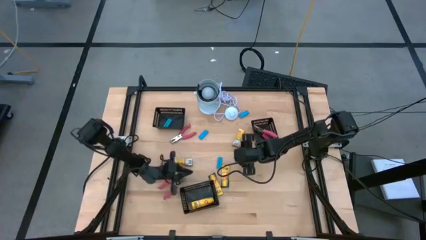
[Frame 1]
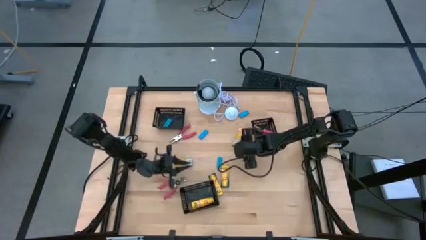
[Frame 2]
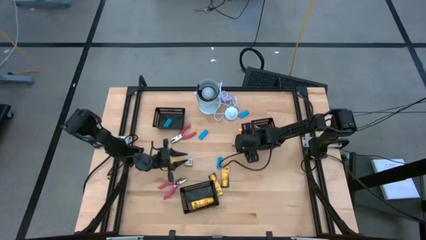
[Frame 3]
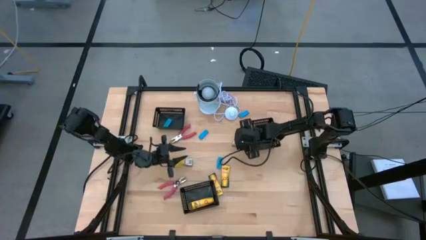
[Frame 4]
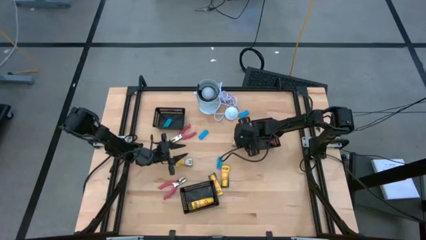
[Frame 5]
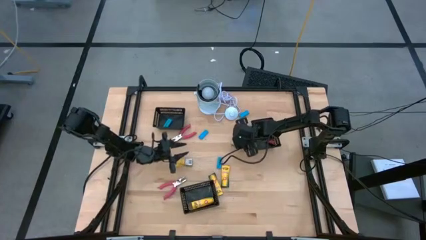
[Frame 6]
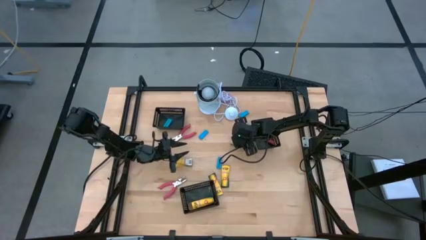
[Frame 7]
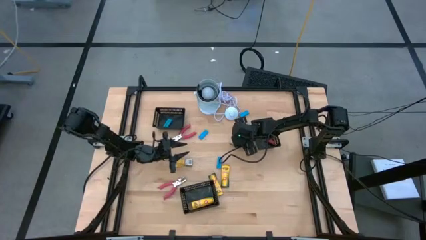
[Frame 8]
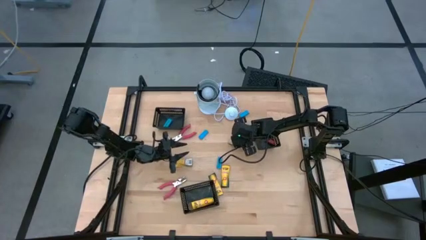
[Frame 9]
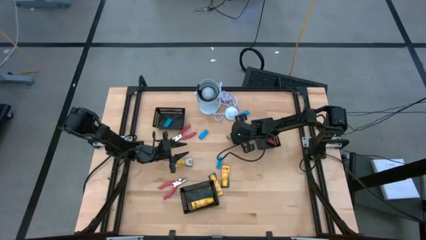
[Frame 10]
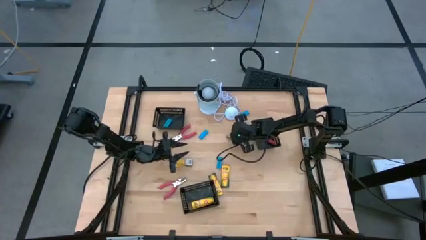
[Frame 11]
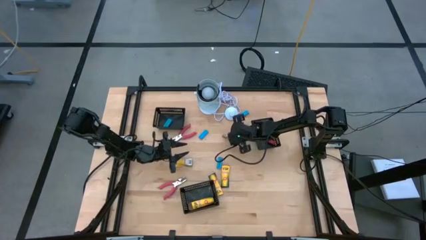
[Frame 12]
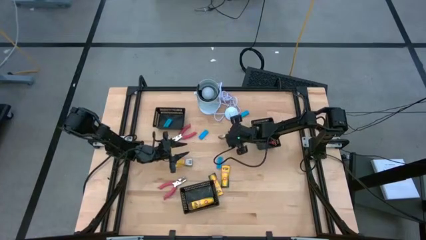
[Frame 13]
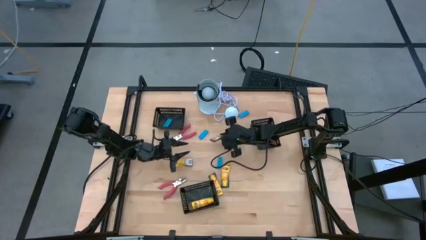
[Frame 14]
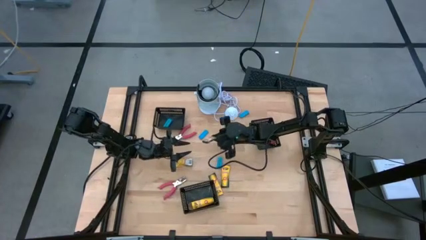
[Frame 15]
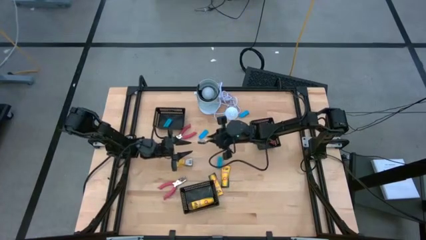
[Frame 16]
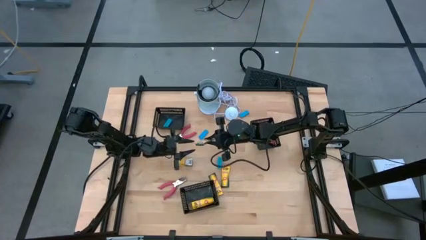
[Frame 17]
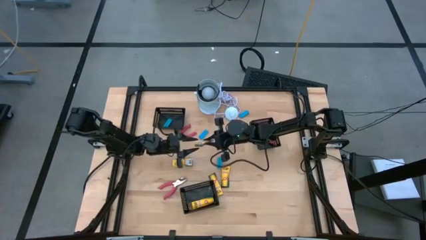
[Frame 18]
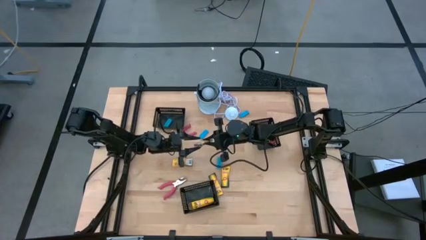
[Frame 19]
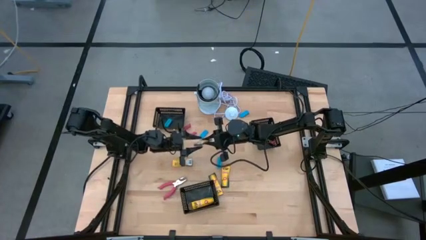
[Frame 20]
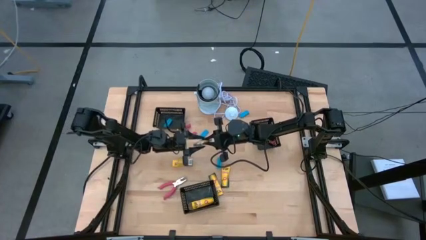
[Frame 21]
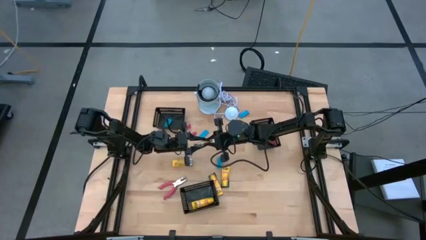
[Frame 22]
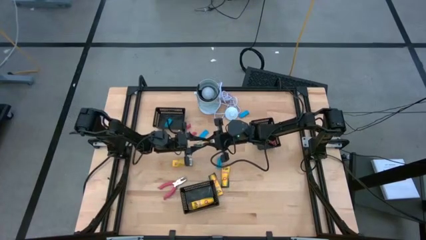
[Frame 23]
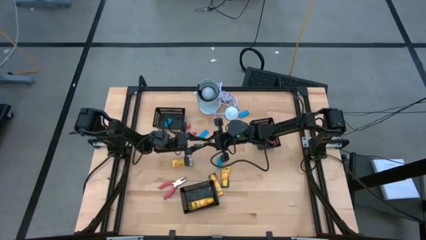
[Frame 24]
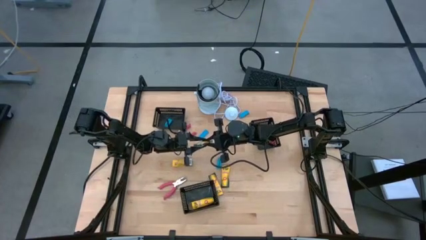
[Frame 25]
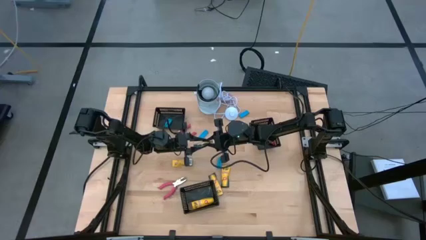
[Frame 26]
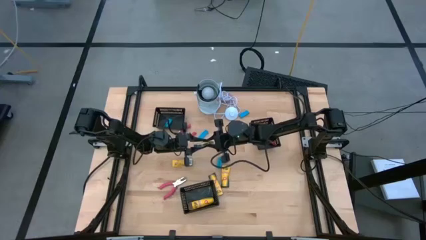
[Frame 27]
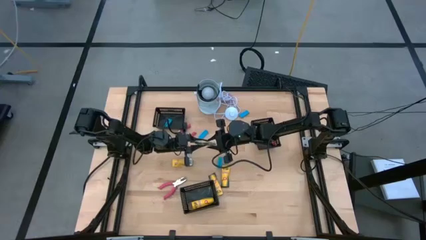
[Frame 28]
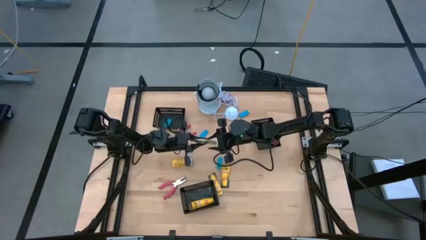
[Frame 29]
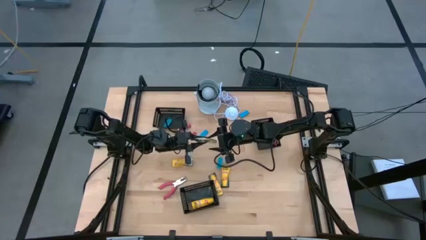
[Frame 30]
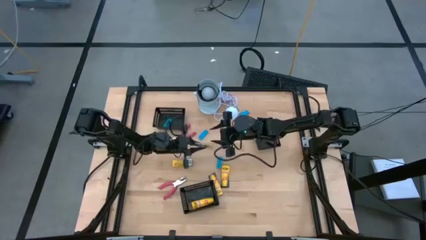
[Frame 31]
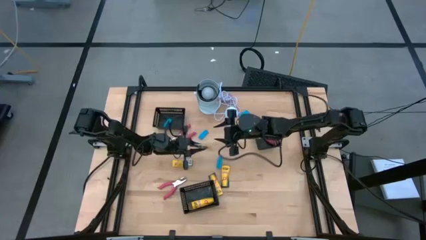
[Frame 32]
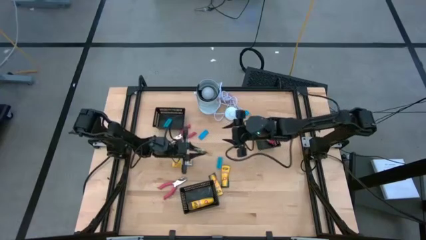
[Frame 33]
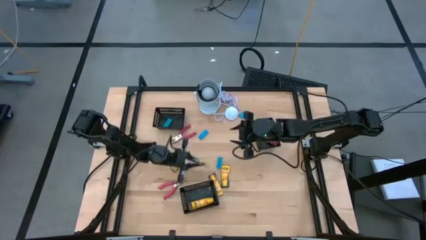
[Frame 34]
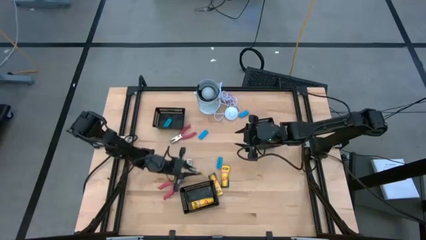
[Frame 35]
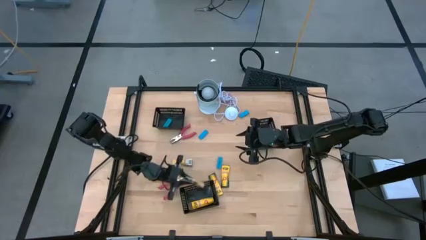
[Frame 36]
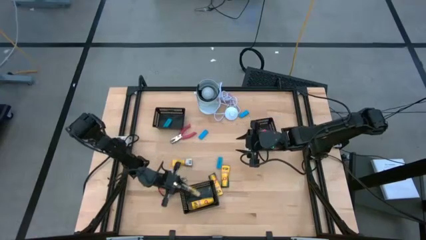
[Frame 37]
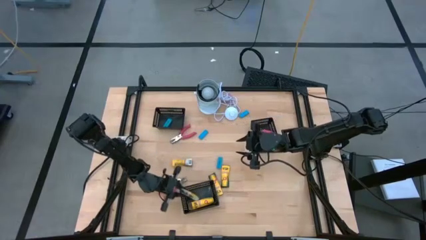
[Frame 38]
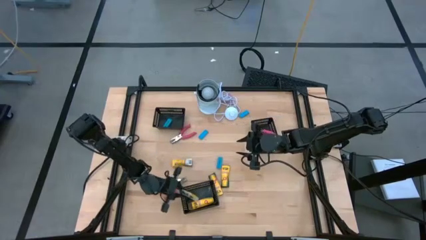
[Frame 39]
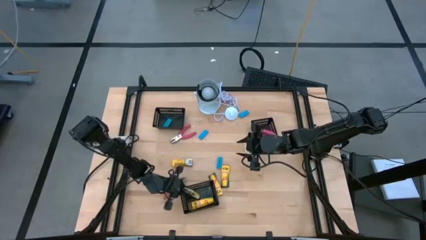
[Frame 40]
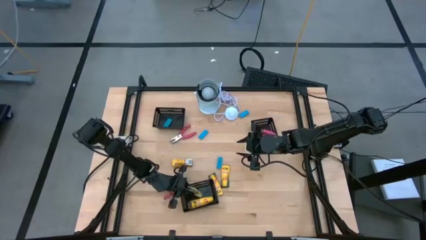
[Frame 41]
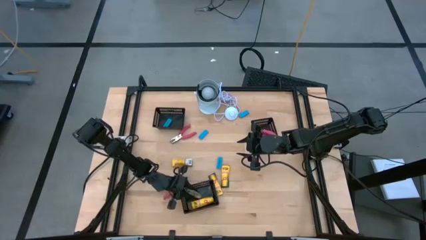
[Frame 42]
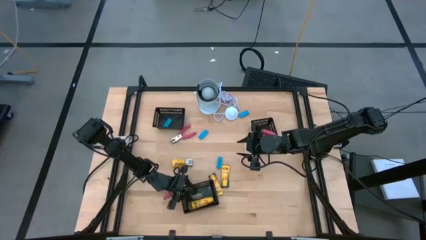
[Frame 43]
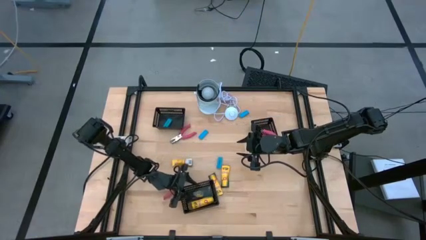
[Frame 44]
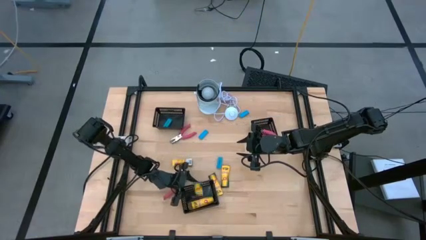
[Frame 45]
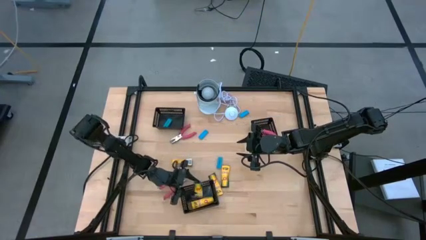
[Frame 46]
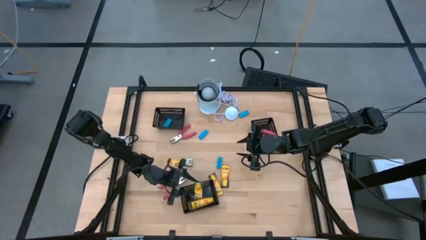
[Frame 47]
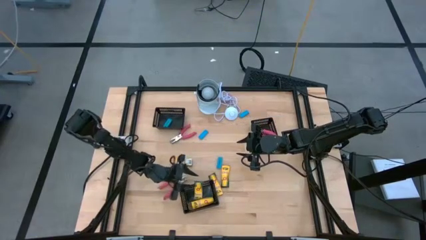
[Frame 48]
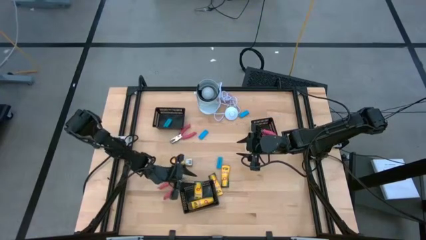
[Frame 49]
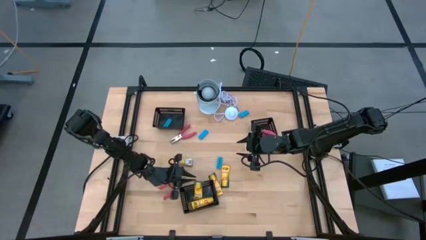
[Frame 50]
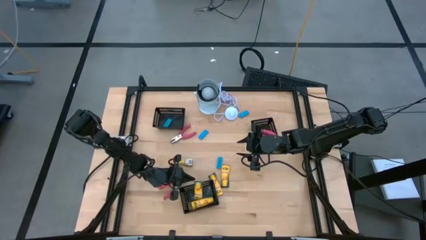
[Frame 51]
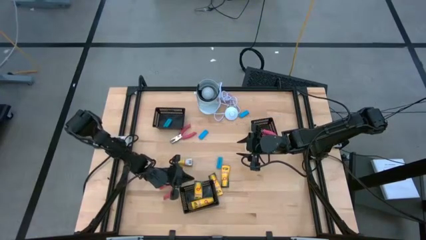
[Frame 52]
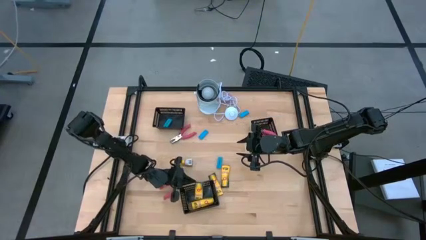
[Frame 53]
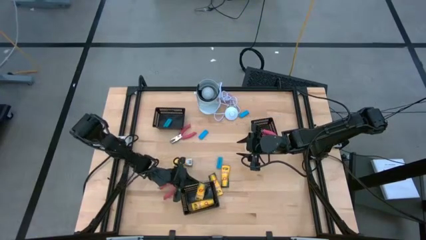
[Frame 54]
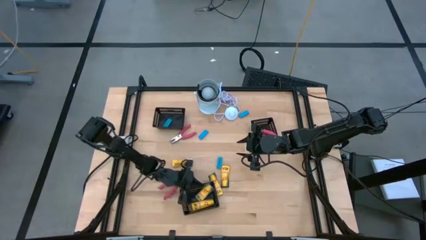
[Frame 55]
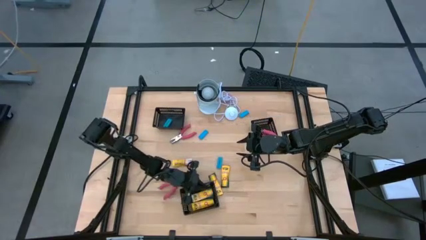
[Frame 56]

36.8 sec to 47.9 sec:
Task: Pick & Place School Supplies
Put the yellow crayon box into the bottom black bin
